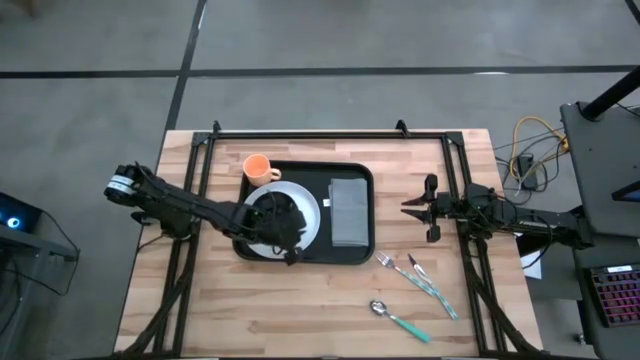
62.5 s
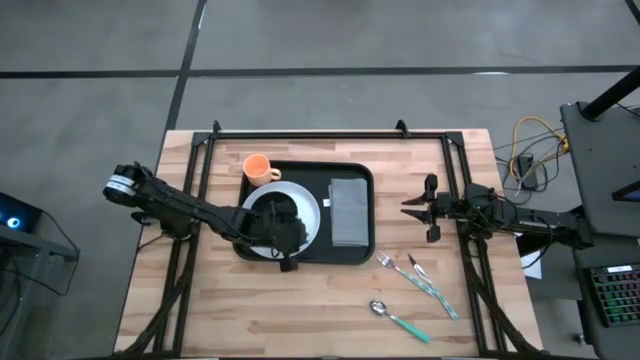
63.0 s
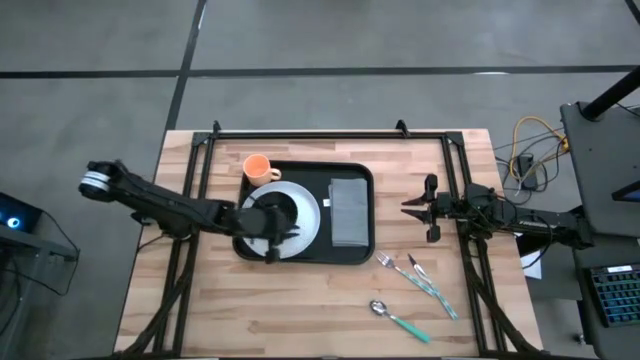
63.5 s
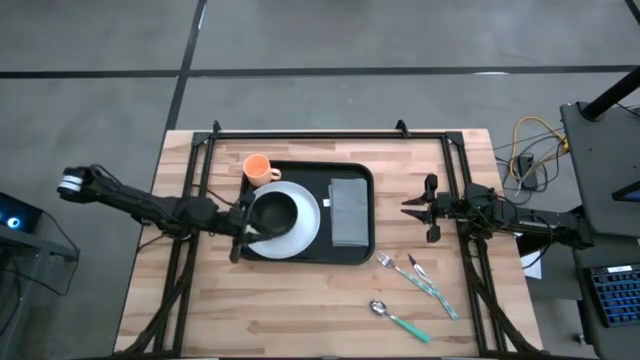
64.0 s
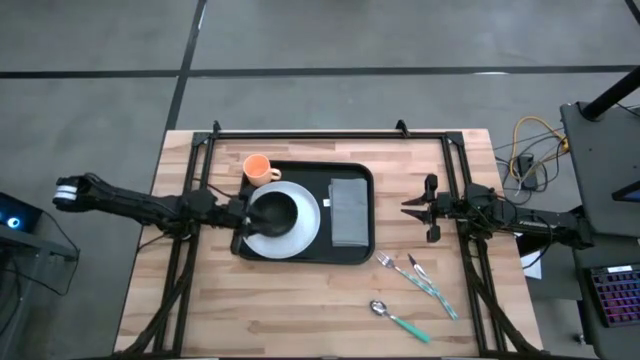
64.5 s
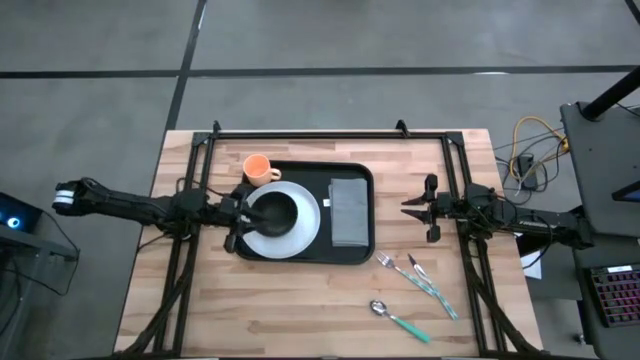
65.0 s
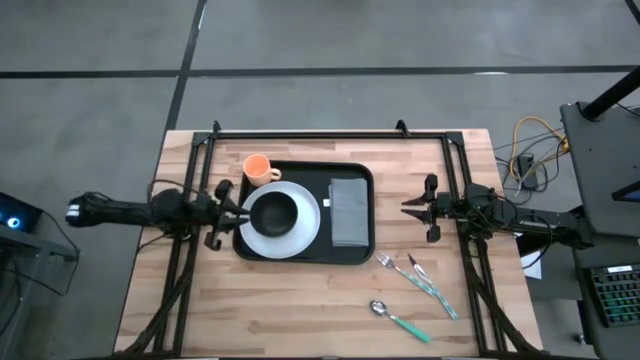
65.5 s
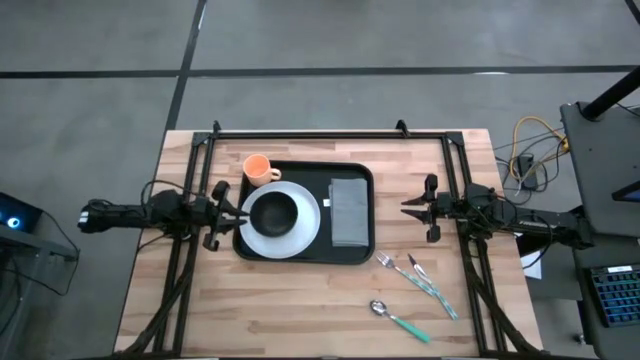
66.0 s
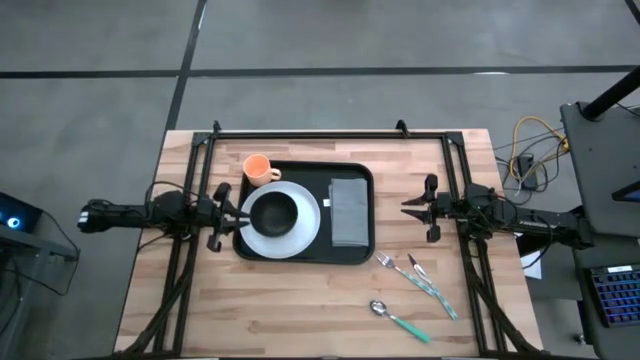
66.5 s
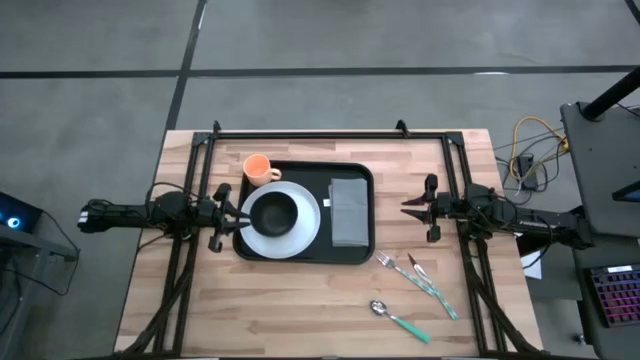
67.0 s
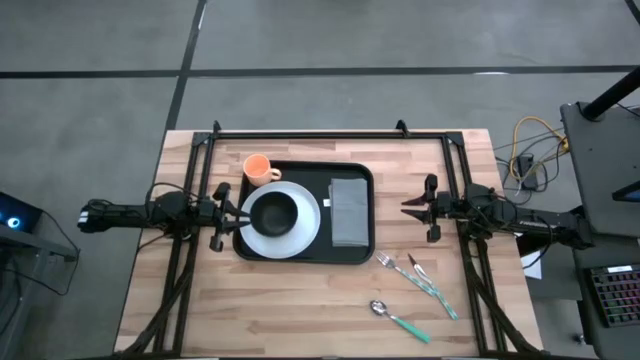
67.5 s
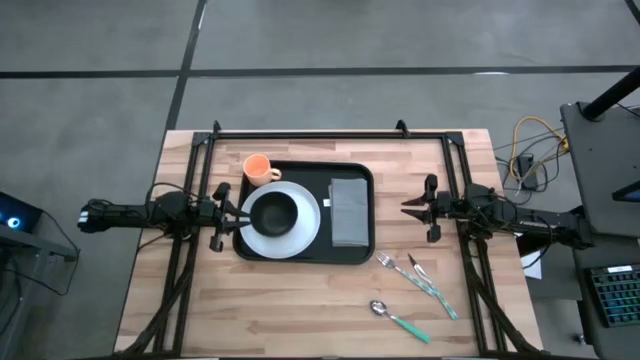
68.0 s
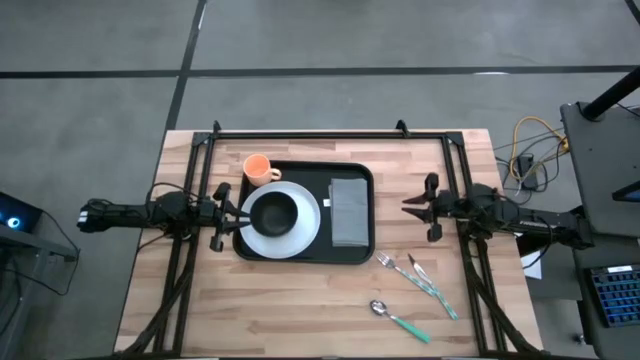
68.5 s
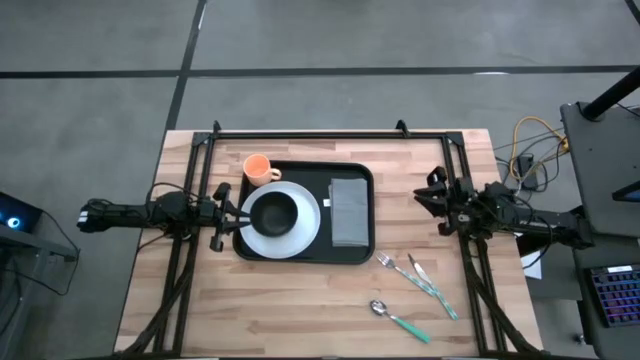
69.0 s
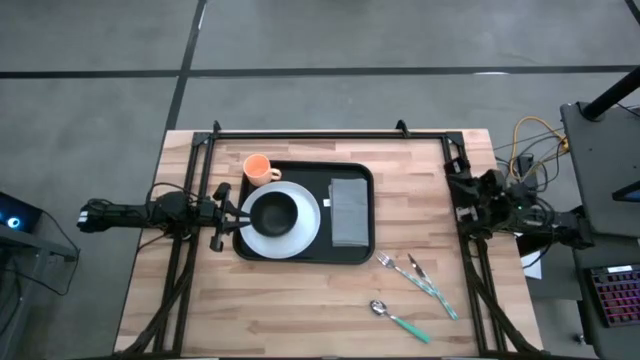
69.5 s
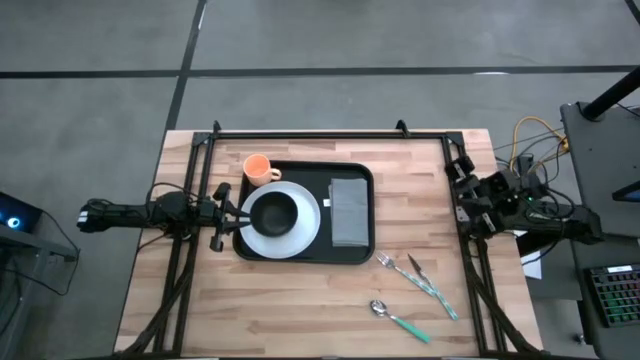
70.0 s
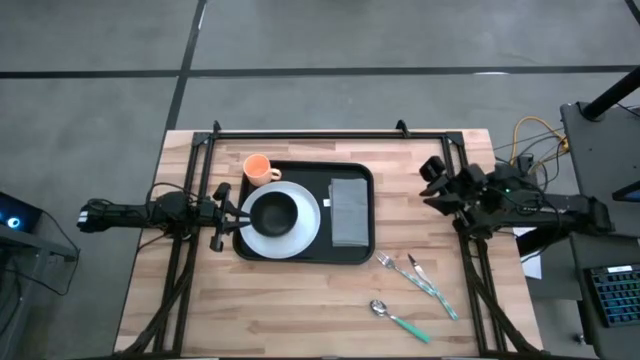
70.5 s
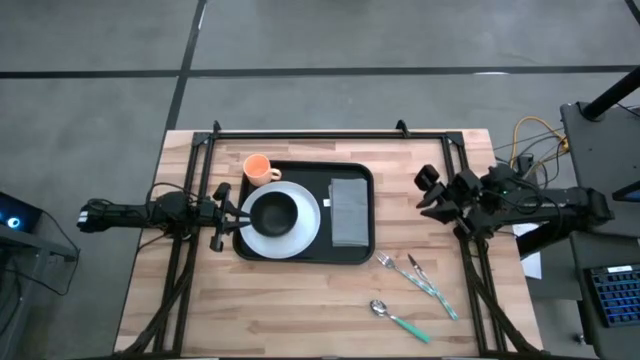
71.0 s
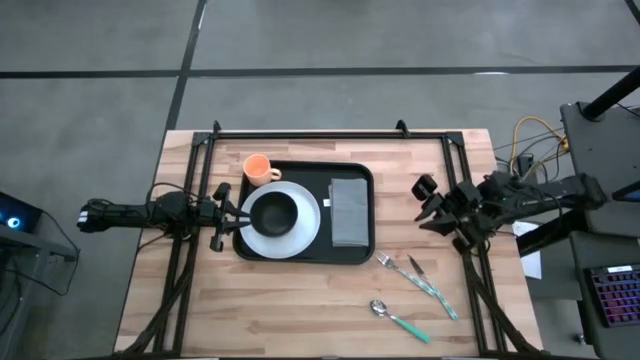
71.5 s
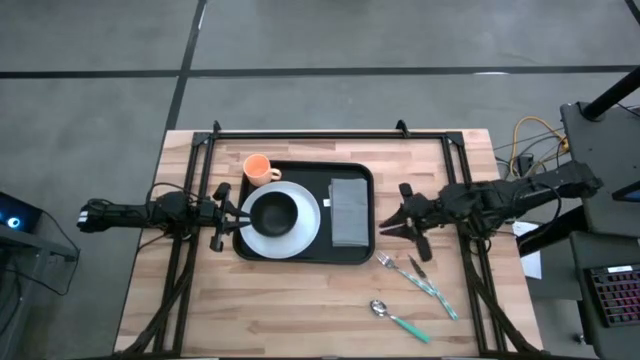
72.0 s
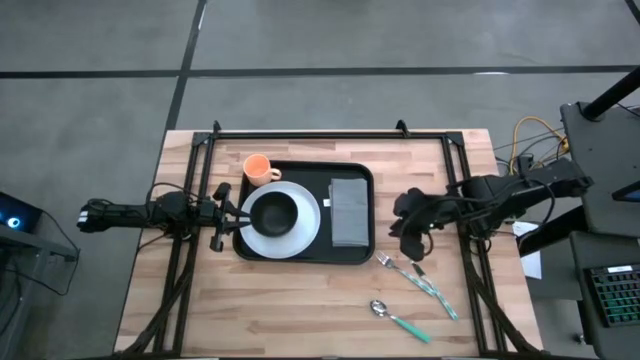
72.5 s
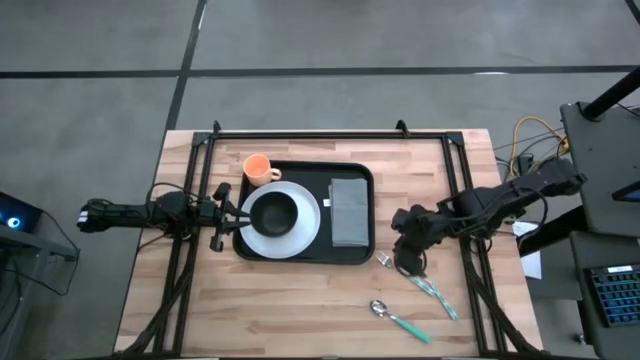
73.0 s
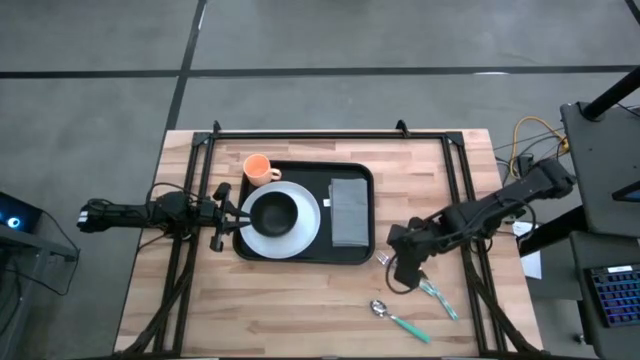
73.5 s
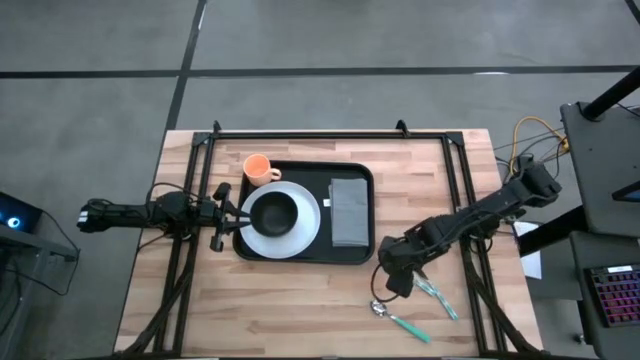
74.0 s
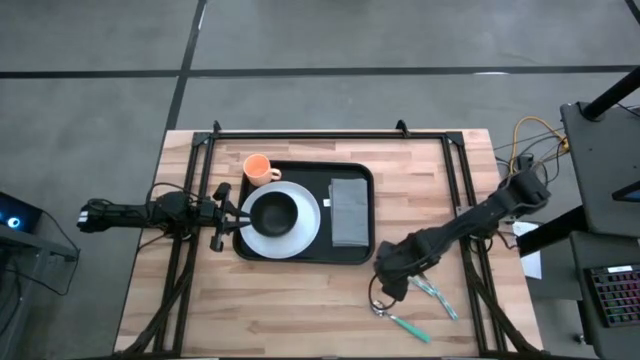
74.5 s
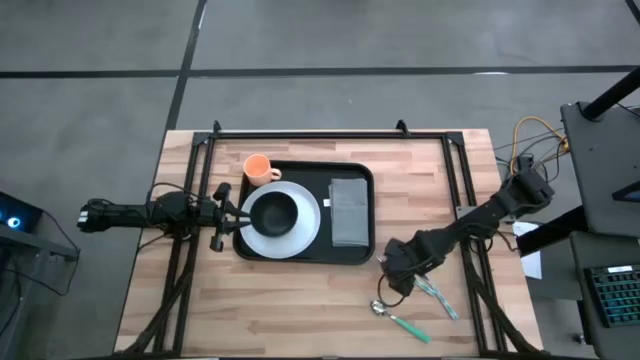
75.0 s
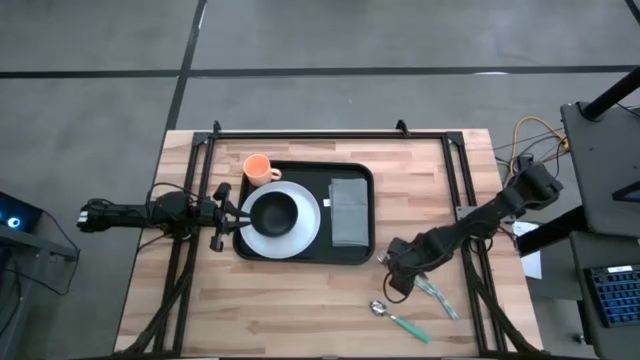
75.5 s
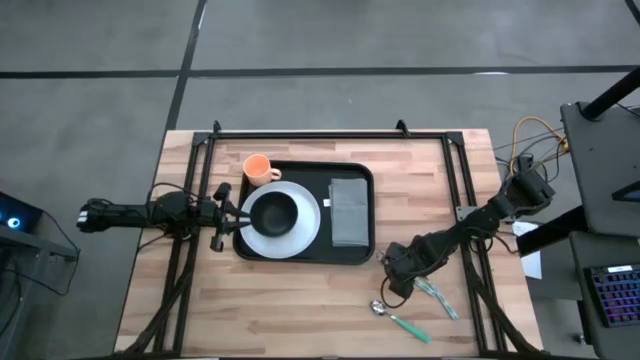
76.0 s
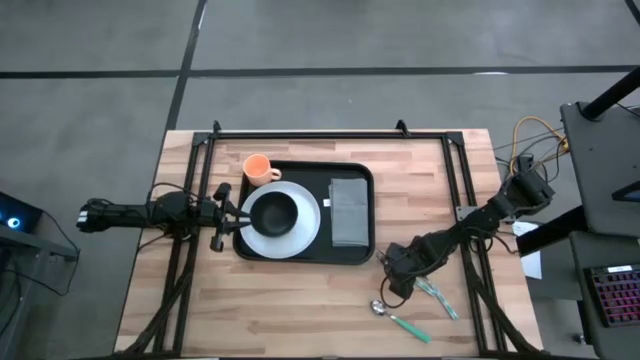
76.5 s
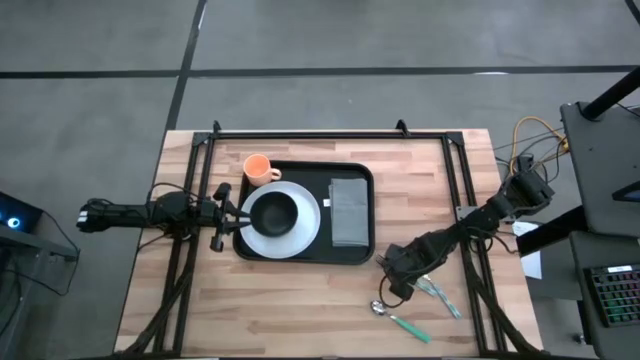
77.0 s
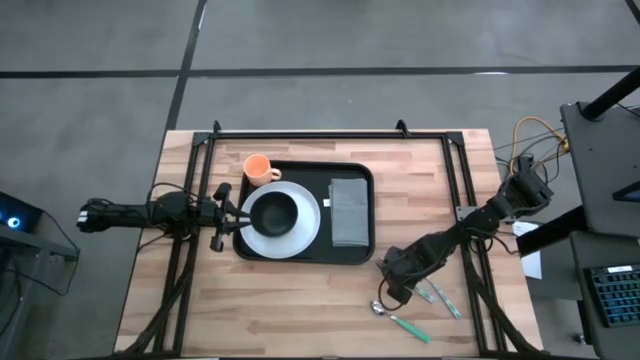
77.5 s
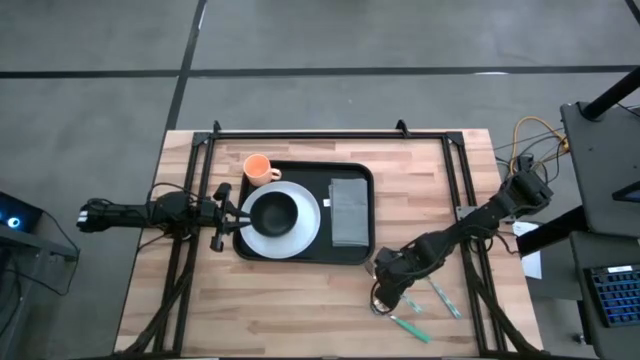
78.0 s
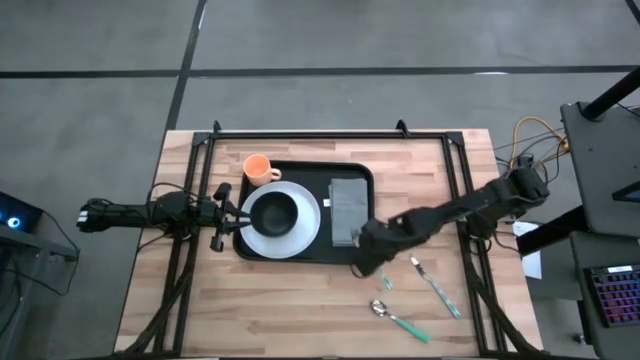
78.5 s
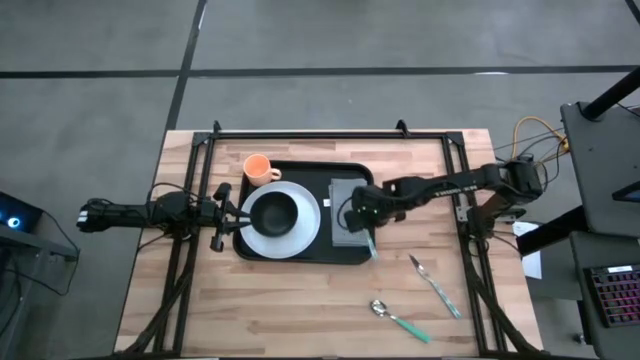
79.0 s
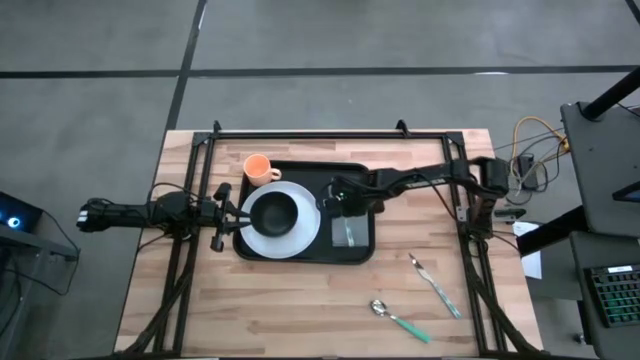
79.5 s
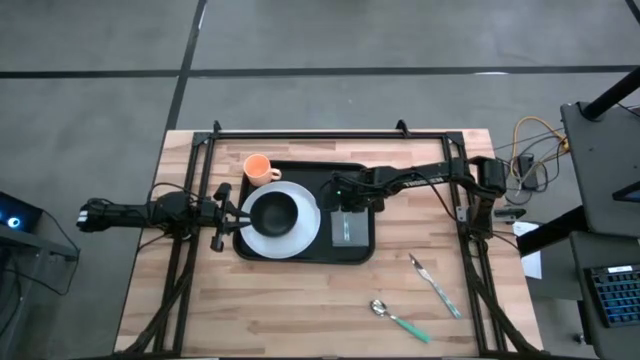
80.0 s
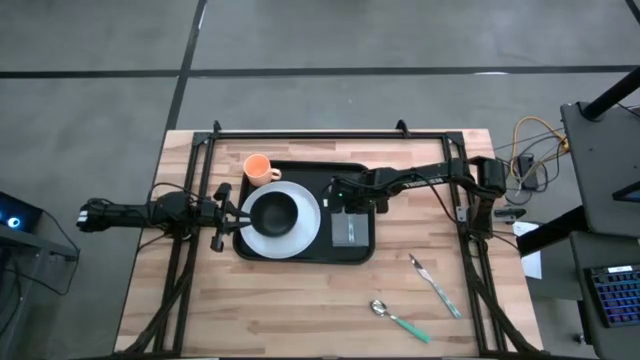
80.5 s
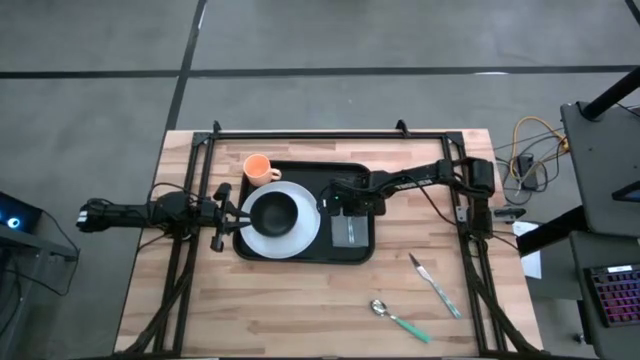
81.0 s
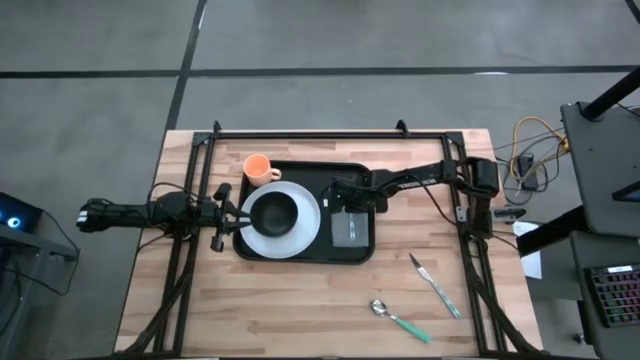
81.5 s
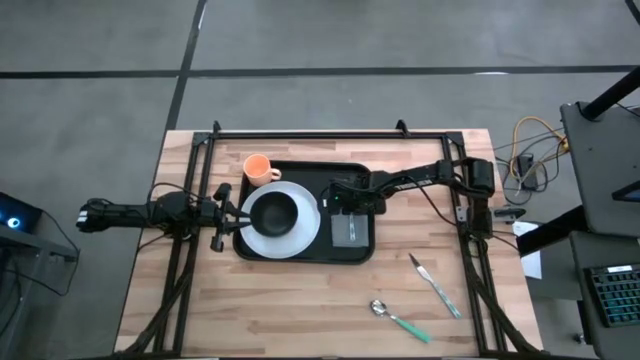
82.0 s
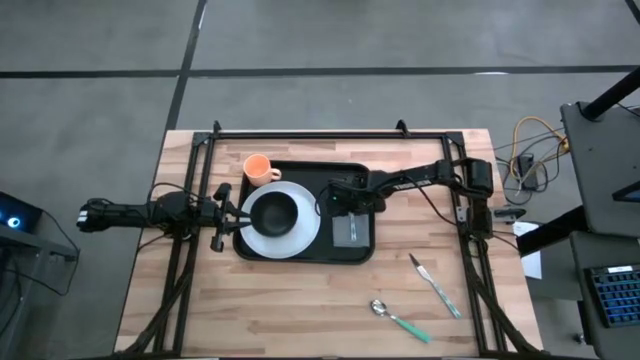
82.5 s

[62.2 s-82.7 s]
Task: Set up tray
Put the white and blue fork on the gray napkin
